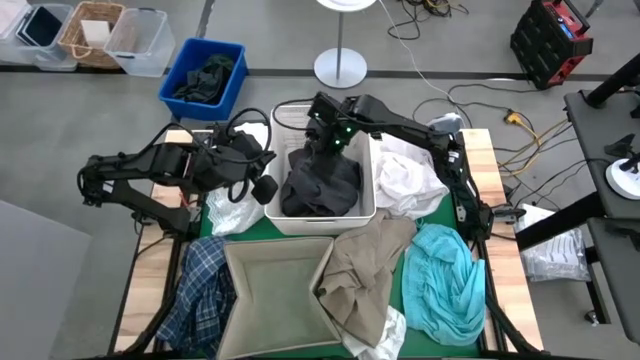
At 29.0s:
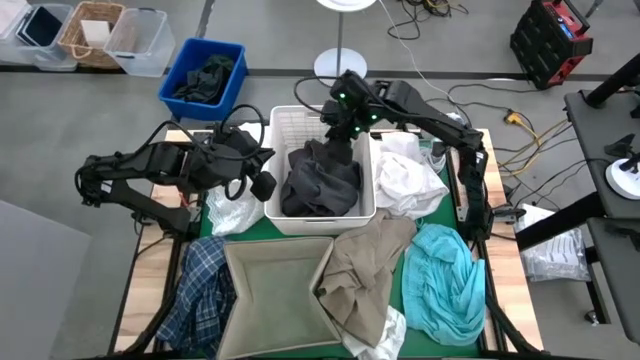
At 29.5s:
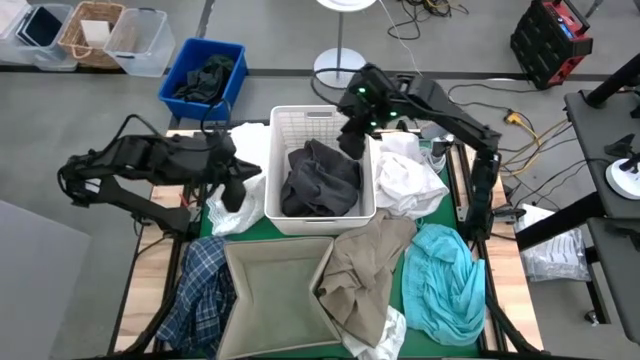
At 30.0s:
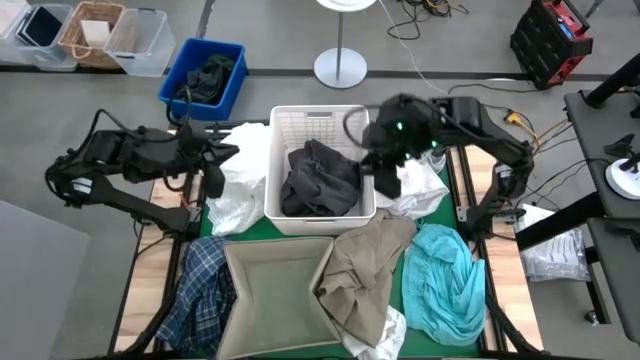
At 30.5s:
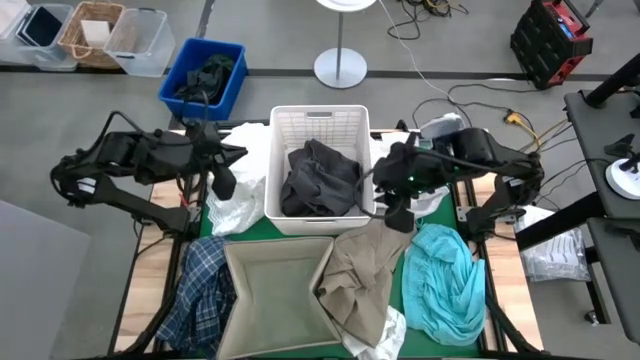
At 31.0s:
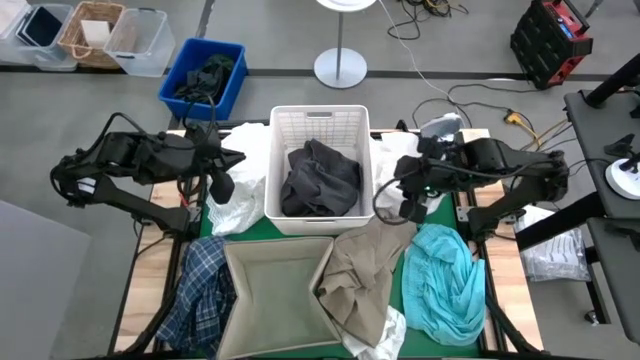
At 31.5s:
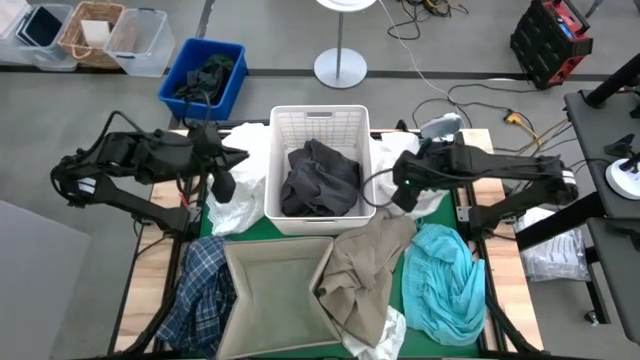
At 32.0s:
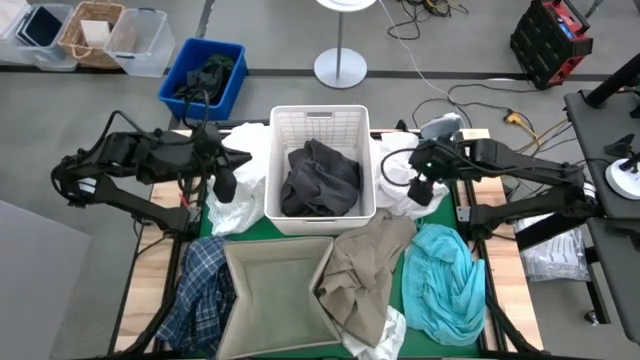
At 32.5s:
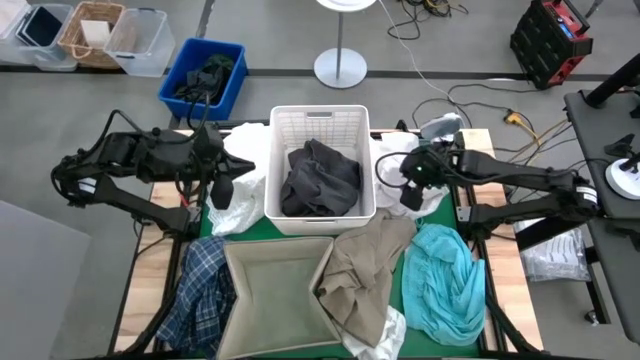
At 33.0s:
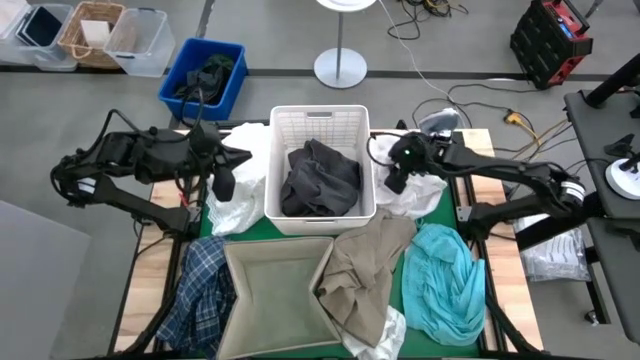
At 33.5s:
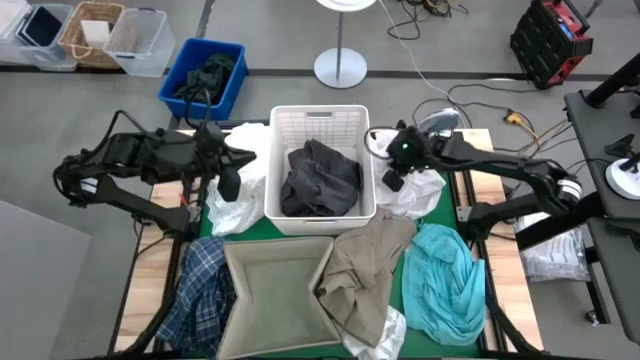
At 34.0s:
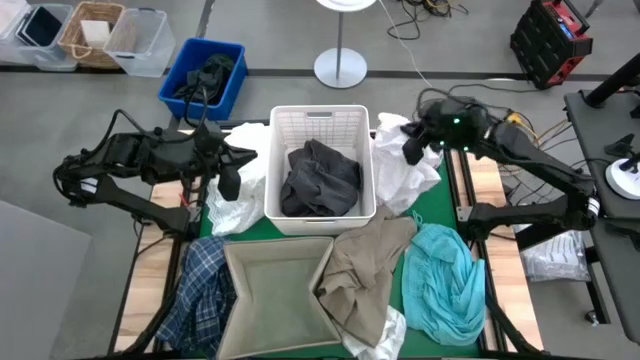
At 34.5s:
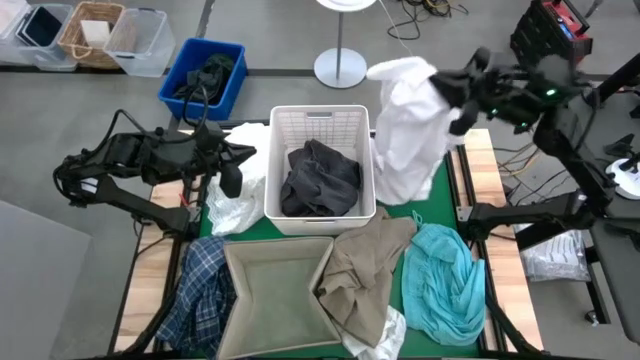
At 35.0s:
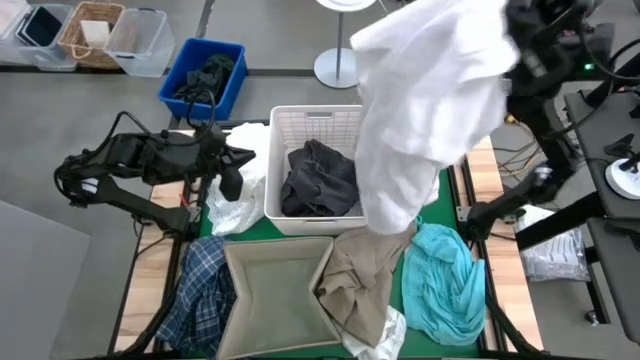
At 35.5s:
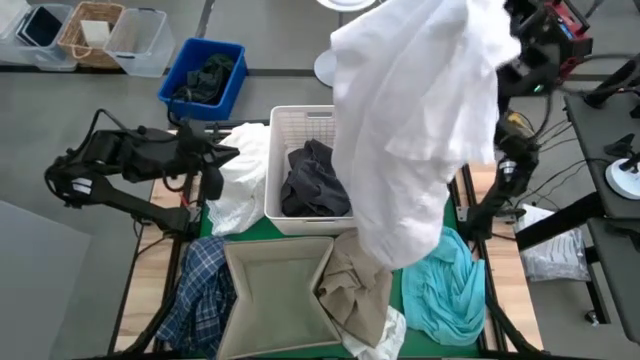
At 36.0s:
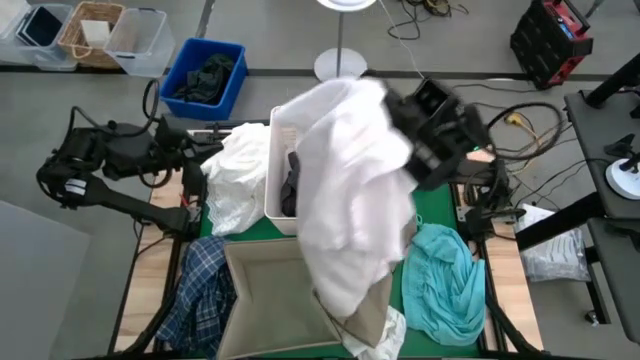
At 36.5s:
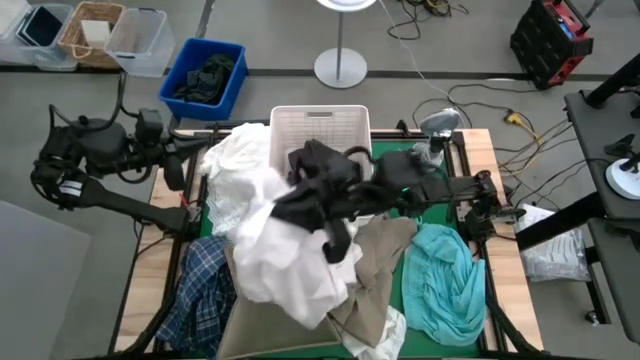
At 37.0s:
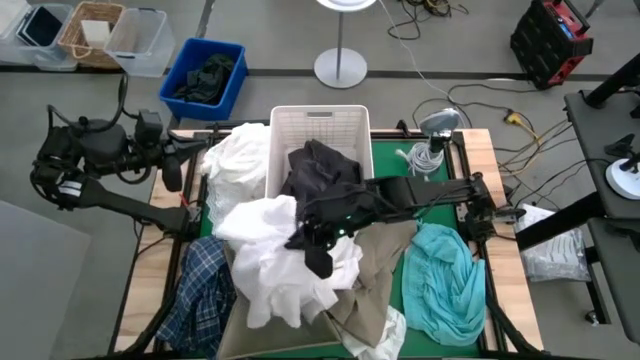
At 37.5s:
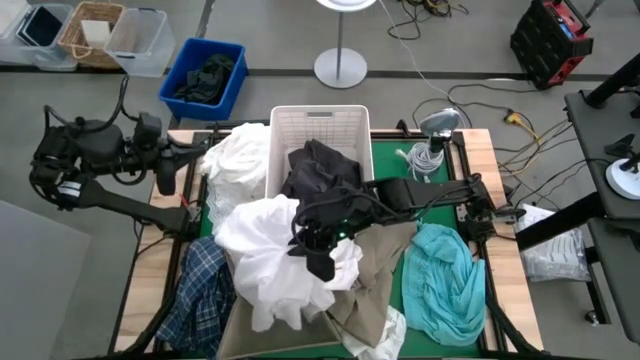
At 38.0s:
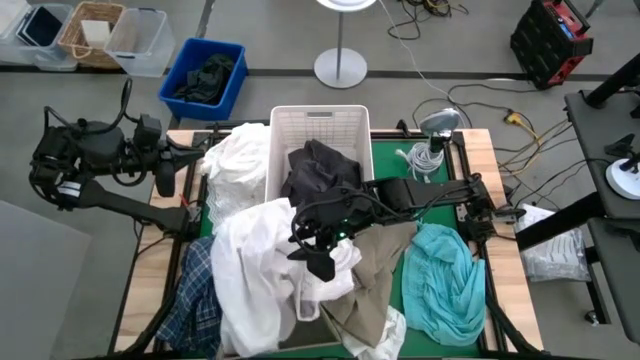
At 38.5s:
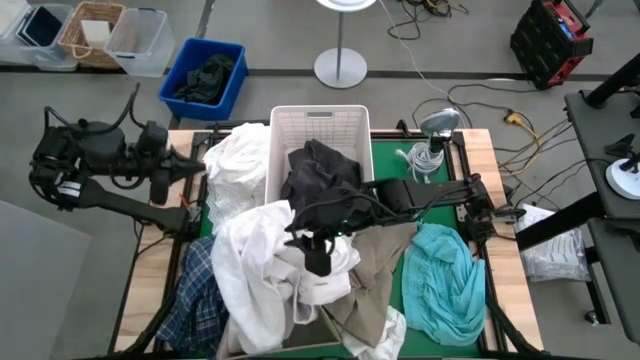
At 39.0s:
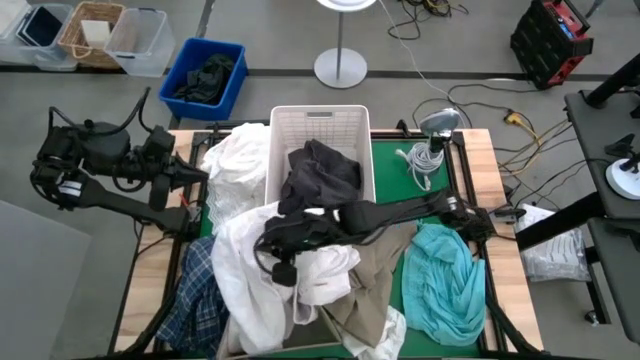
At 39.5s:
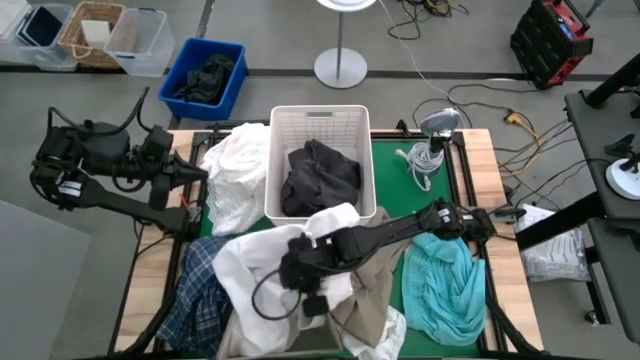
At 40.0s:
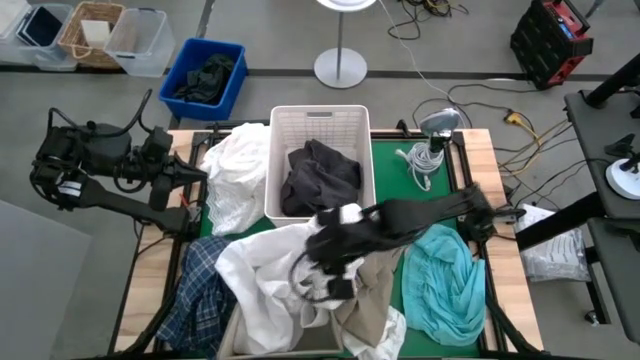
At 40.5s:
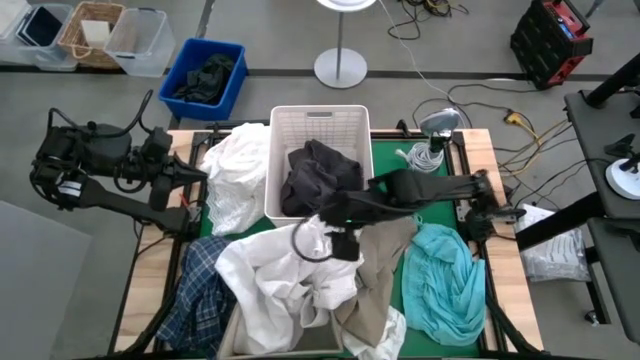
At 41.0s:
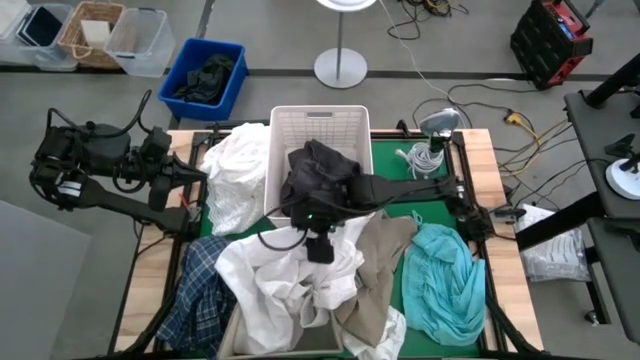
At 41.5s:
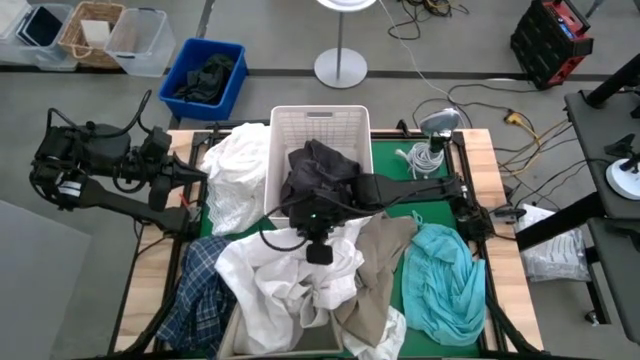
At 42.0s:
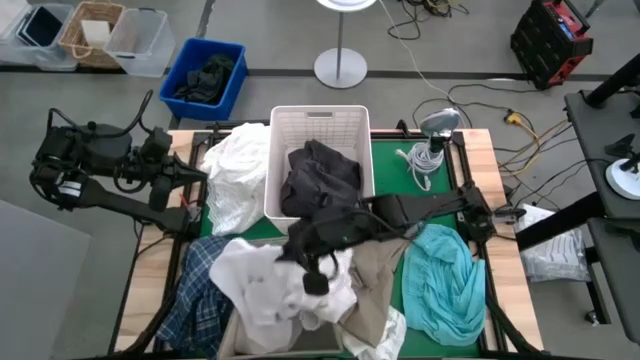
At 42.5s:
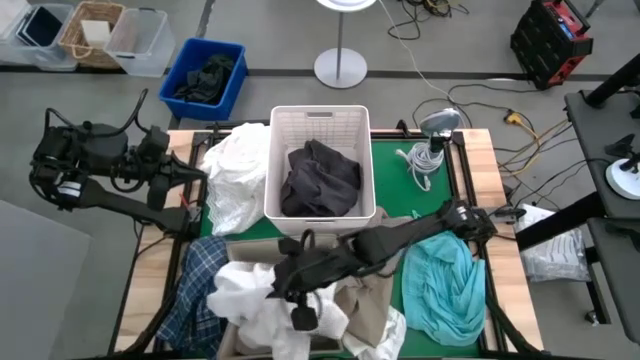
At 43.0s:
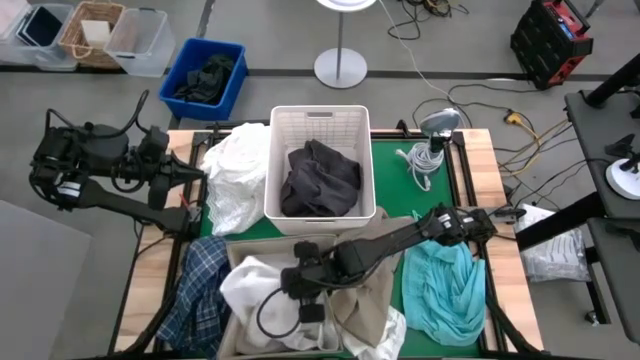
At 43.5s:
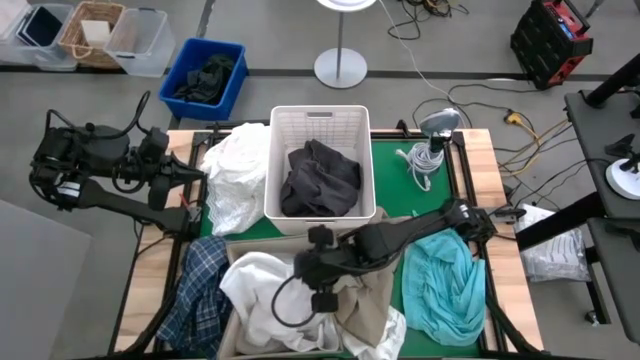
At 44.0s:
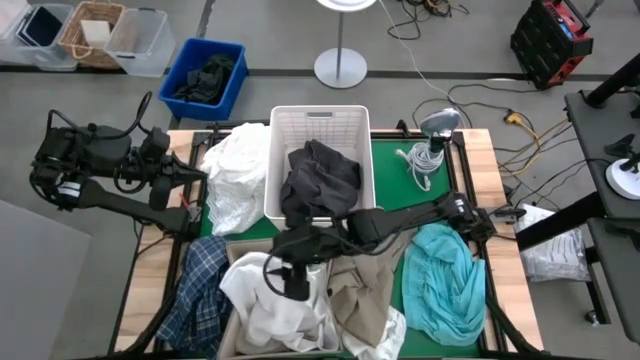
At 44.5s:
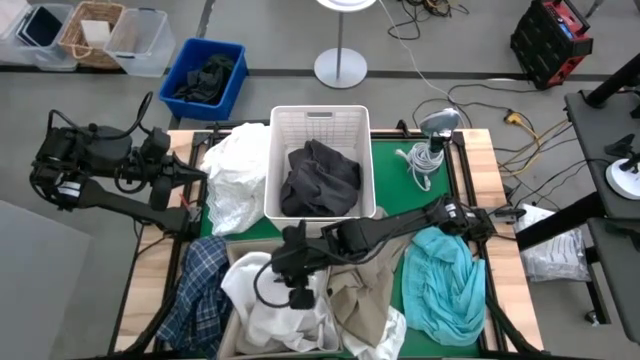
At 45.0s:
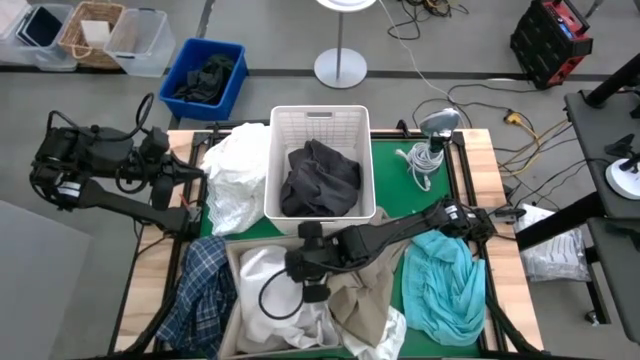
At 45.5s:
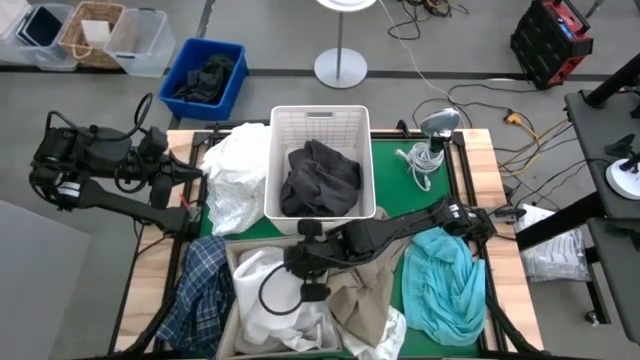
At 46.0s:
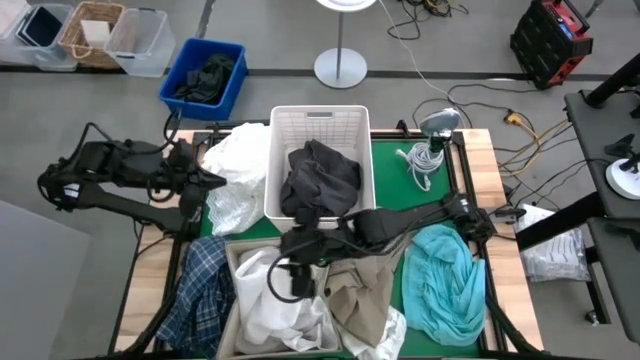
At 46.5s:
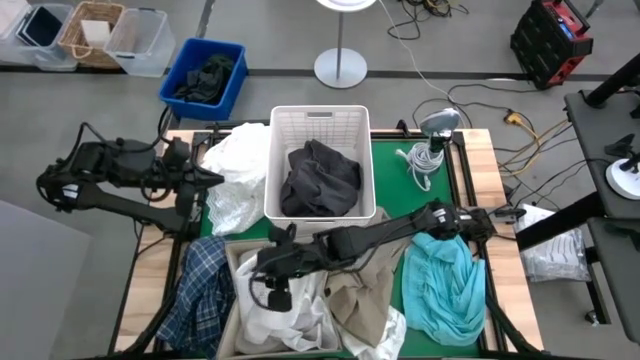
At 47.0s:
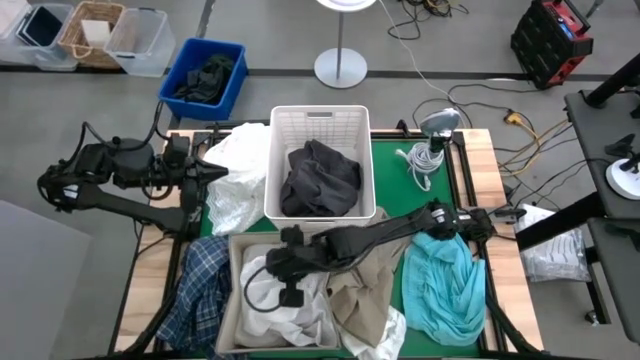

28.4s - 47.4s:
Task: Sort clothes
Put the white polo shirt into the brown laundry organizer

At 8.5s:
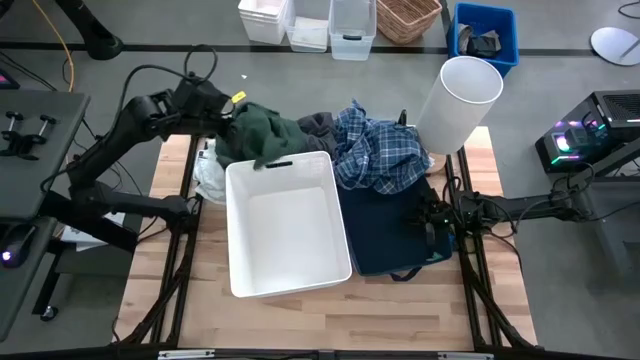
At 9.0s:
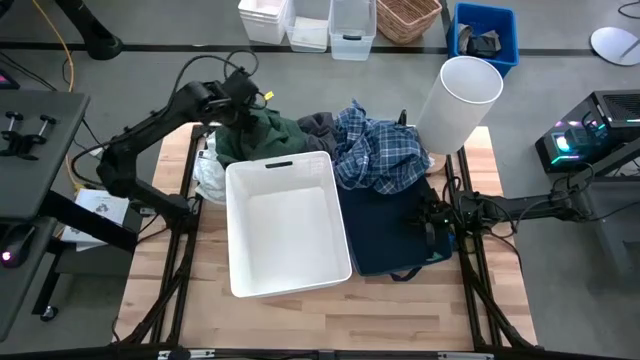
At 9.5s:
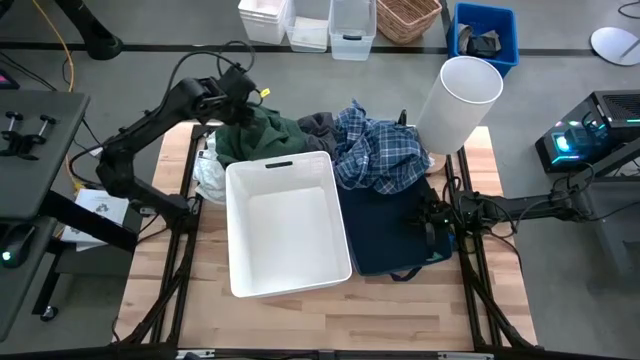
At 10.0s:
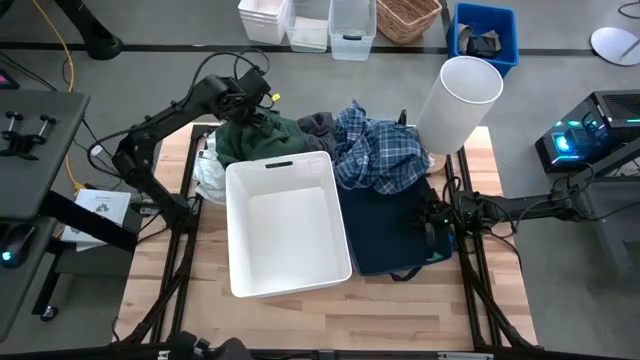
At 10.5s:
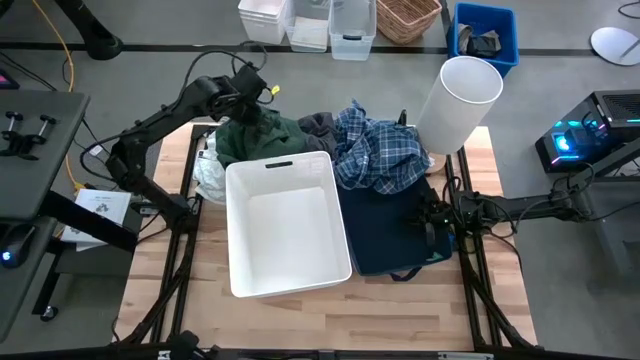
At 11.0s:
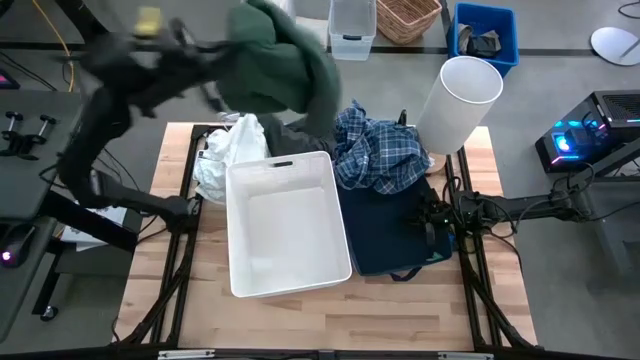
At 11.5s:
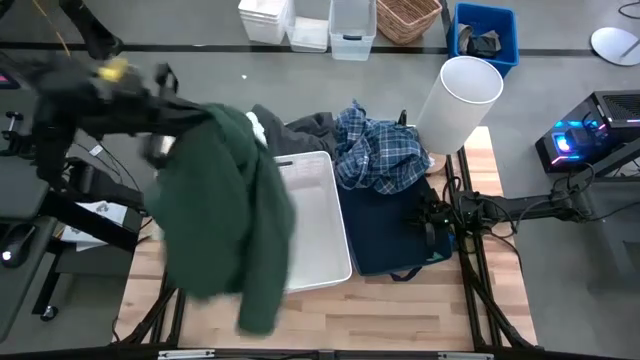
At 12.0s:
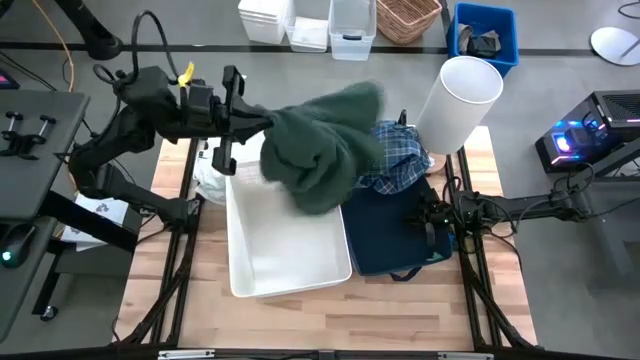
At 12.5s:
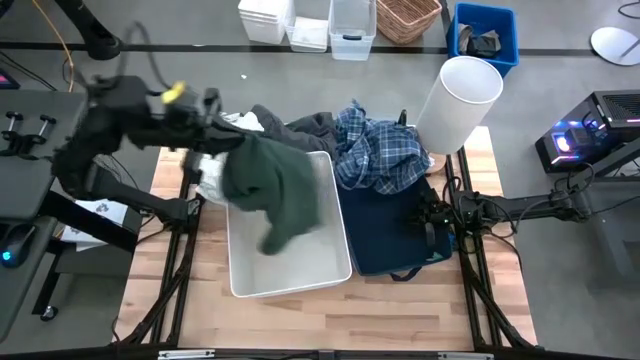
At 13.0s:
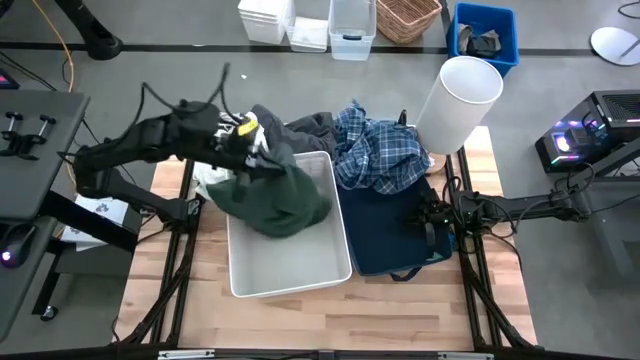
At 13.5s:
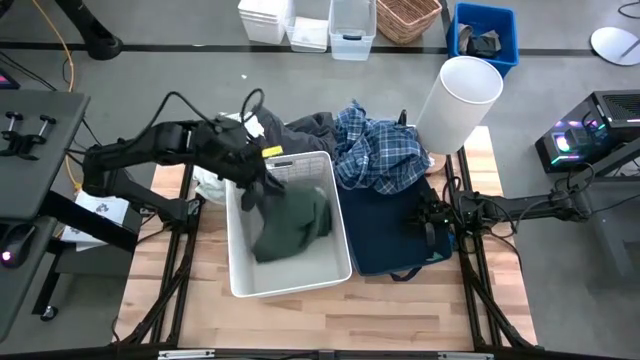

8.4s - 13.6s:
Task: Sort clothes
Put the green shirt into the white laundry bin
